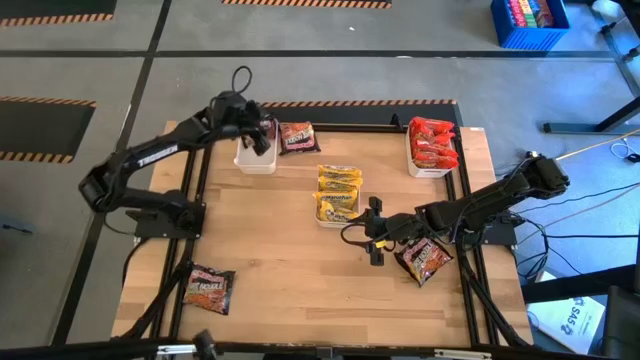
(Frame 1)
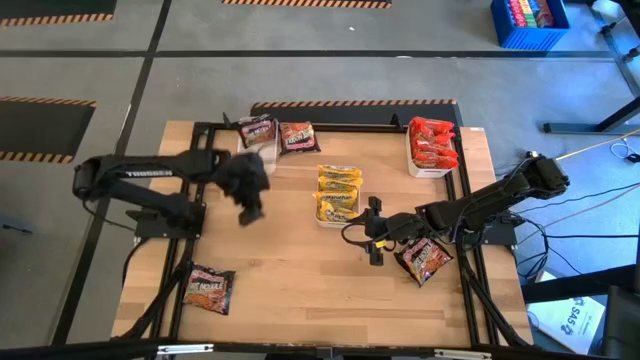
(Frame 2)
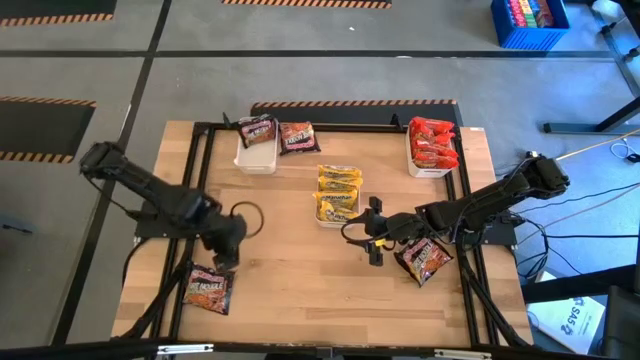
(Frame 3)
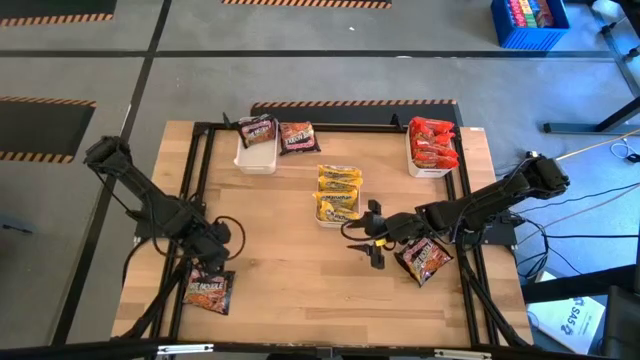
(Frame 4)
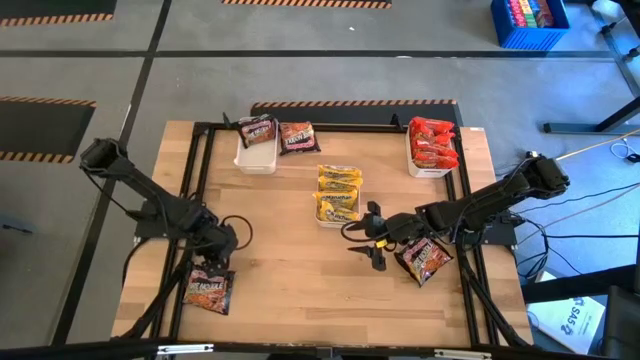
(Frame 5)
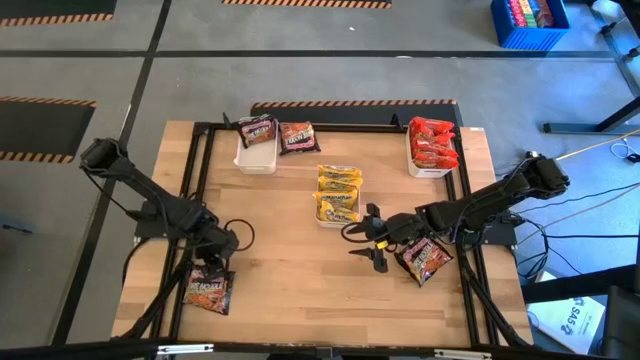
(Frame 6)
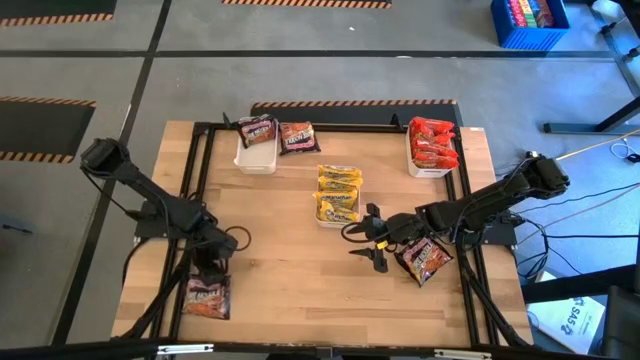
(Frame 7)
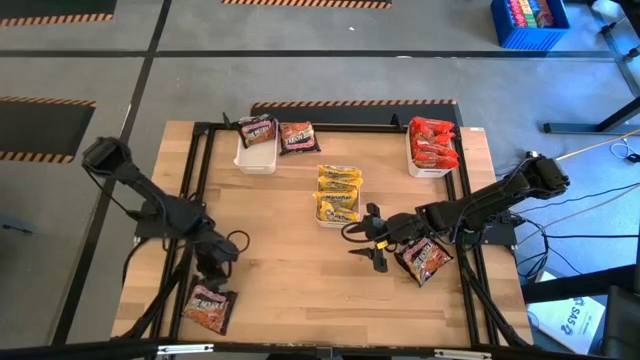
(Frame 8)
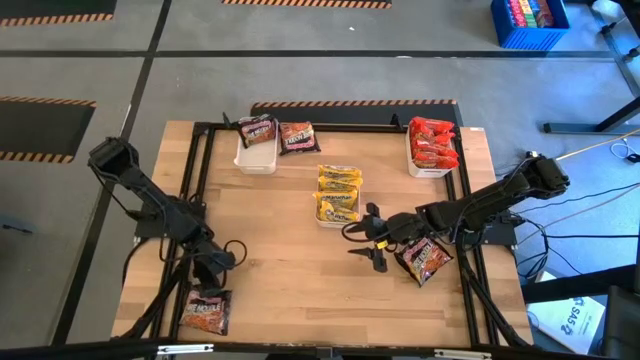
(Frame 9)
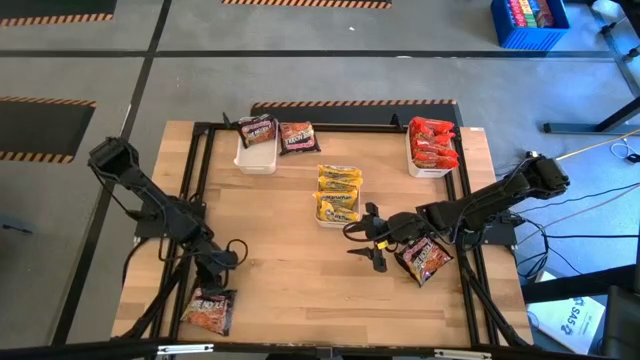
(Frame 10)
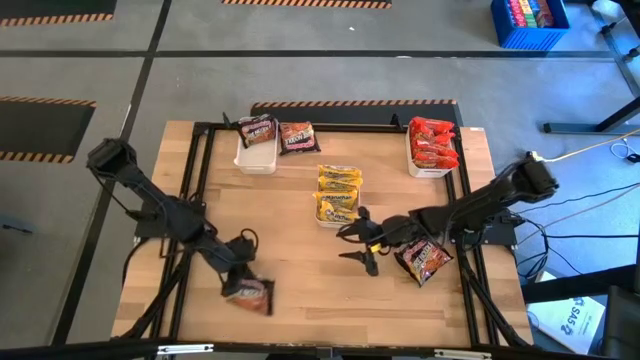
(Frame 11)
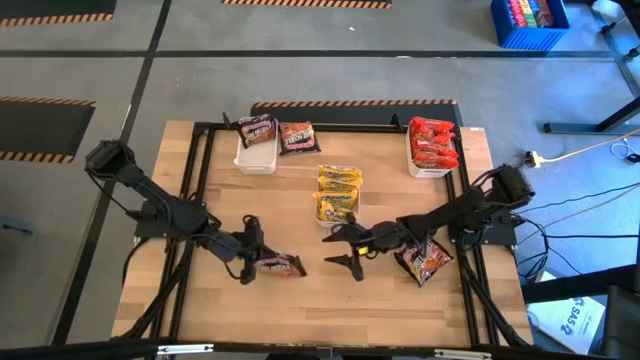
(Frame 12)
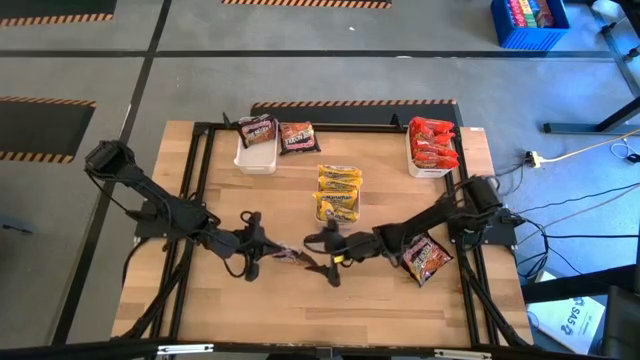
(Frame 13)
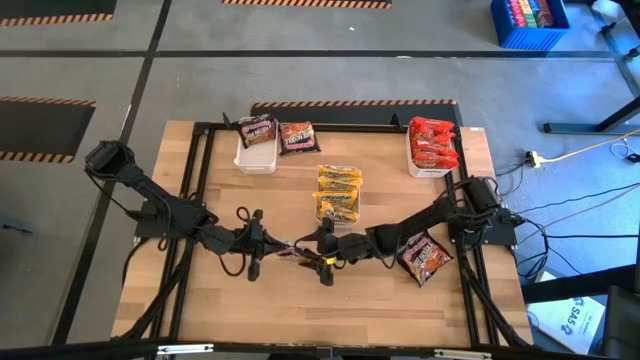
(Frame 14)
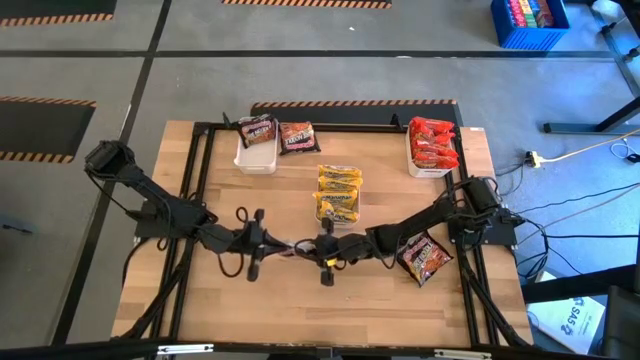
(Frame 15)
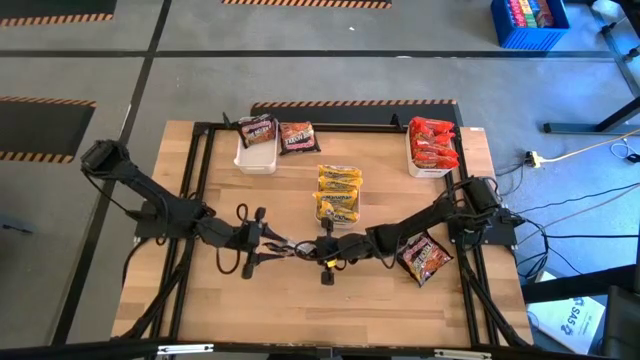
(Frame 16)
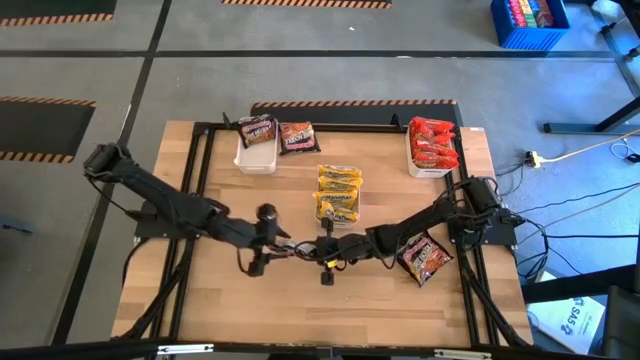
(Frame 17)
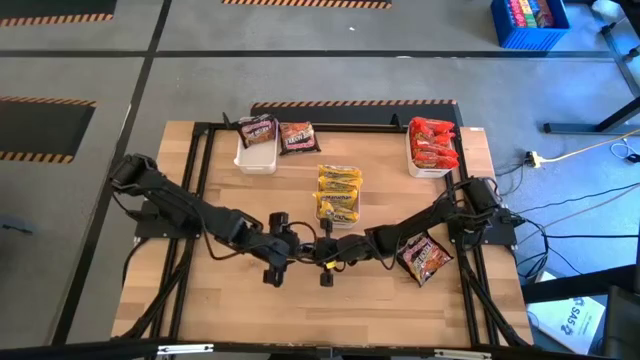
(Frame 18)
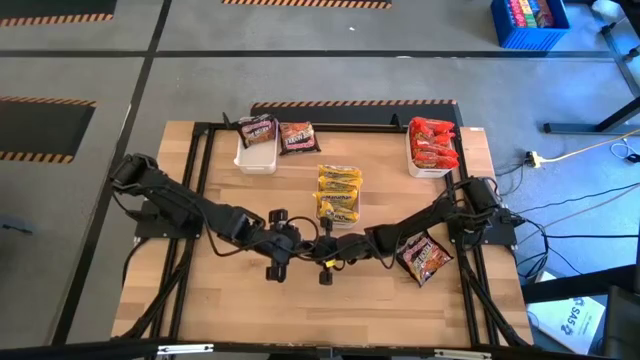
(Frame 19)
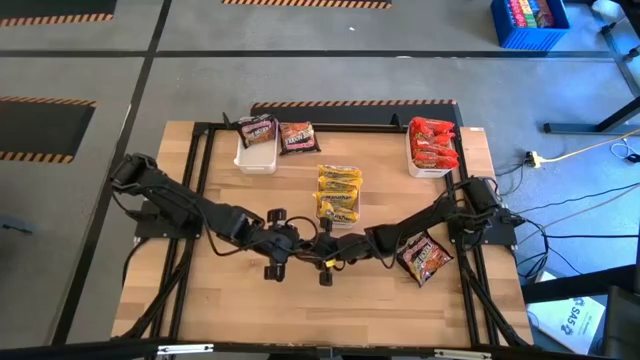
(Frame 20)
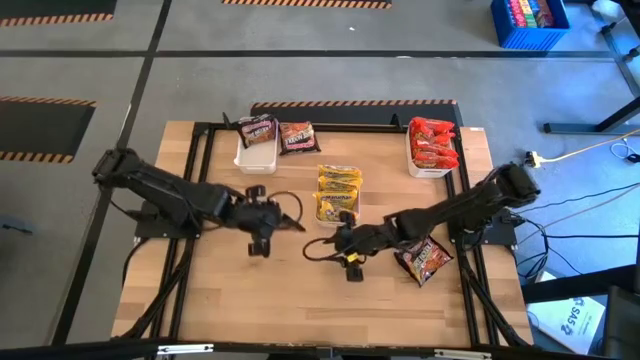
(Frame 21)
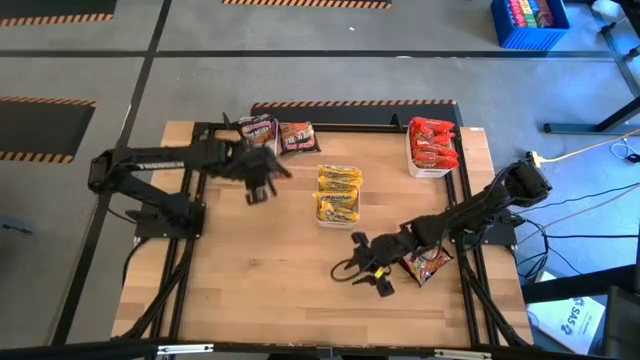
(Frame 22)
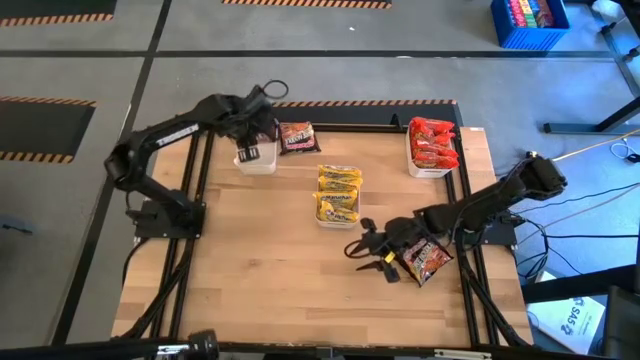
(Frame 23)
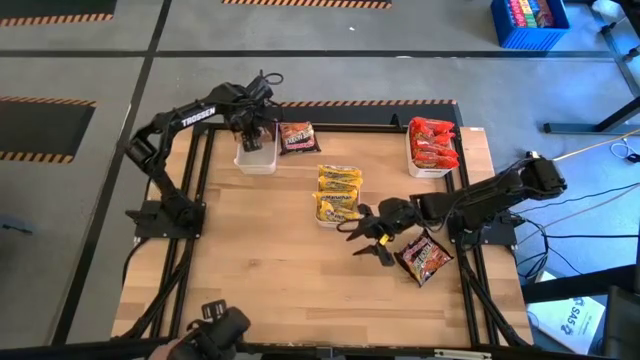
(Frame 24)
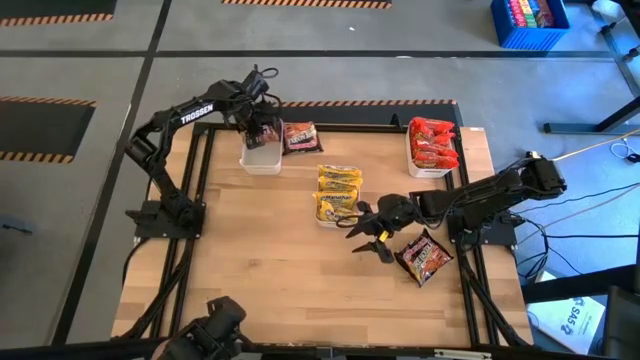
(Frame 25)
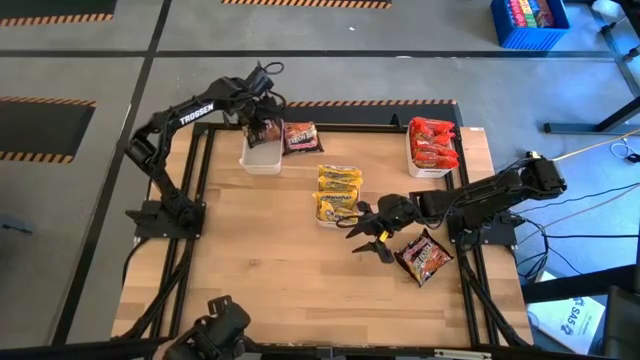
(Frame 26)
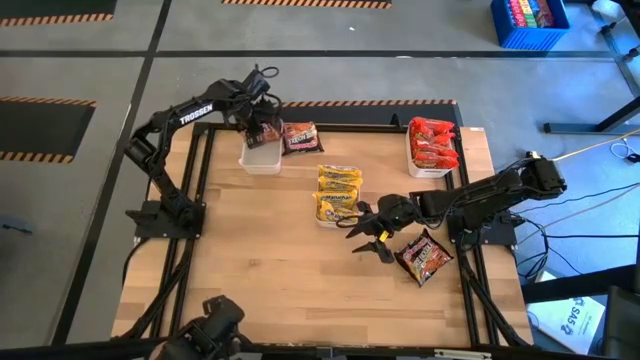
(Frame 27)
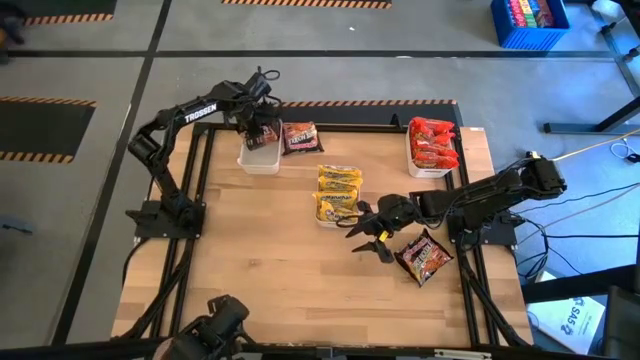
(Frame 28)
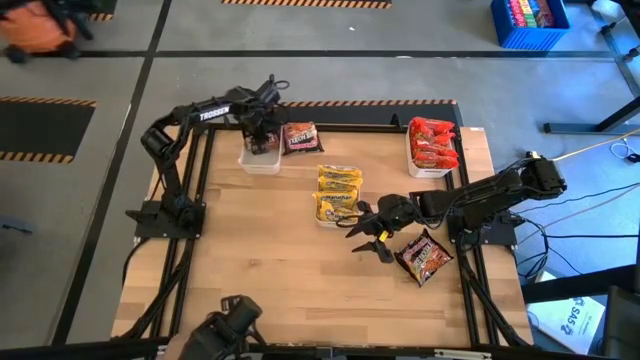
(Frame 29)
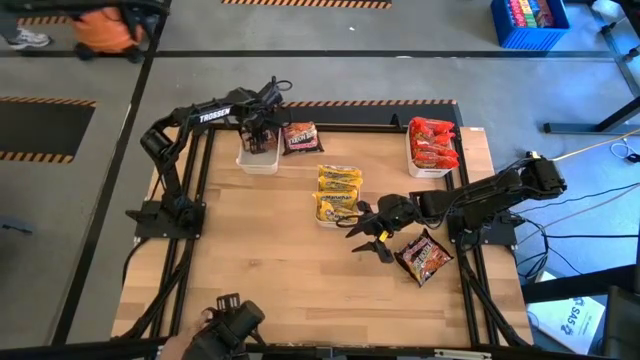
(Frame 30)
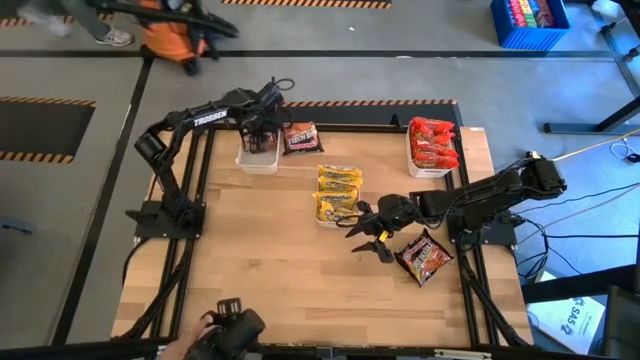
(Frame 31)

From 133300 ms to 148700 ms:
Task: Sort Maruchan noodles
Put the black noodle pack into the white left bin

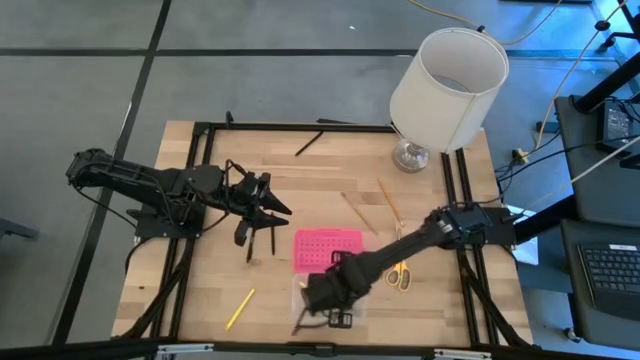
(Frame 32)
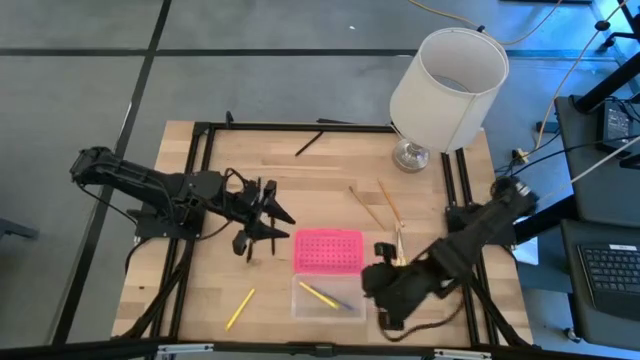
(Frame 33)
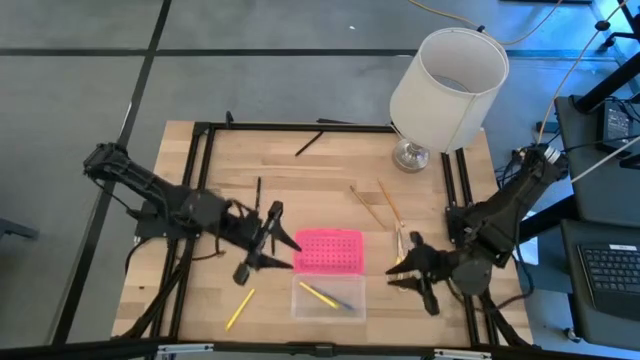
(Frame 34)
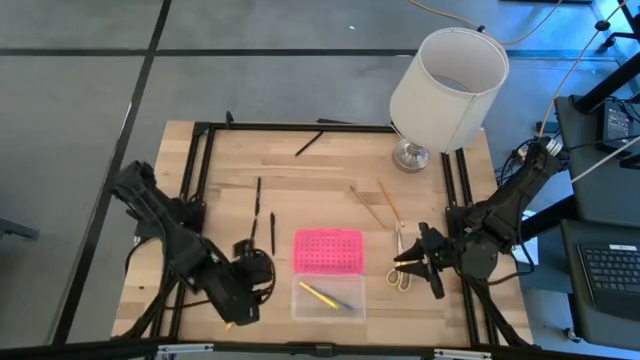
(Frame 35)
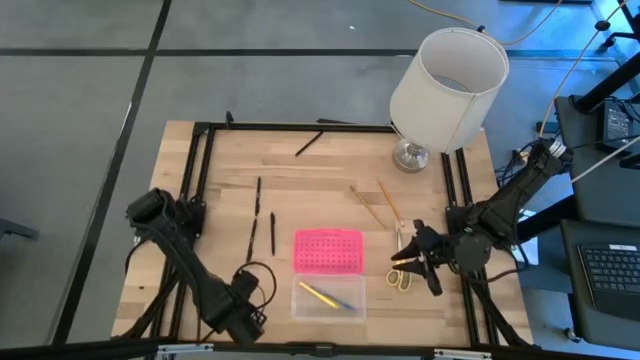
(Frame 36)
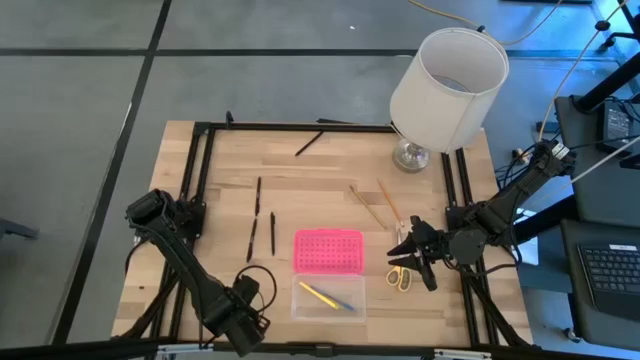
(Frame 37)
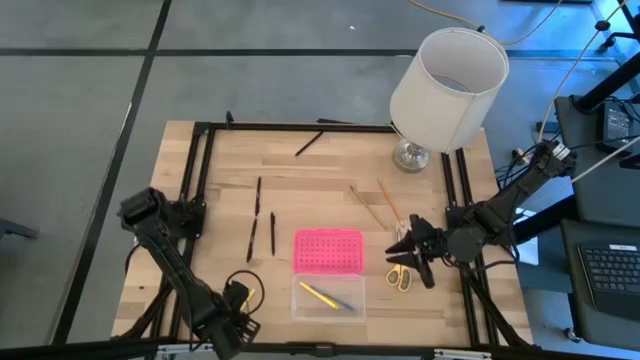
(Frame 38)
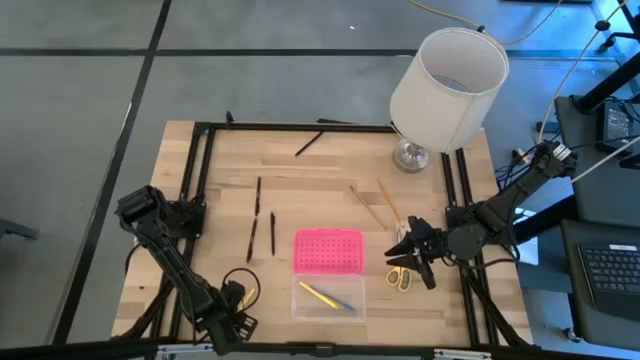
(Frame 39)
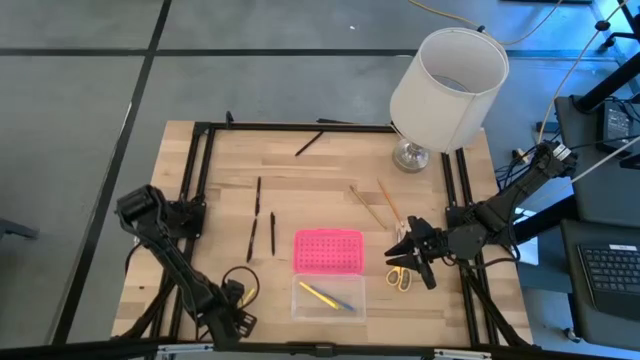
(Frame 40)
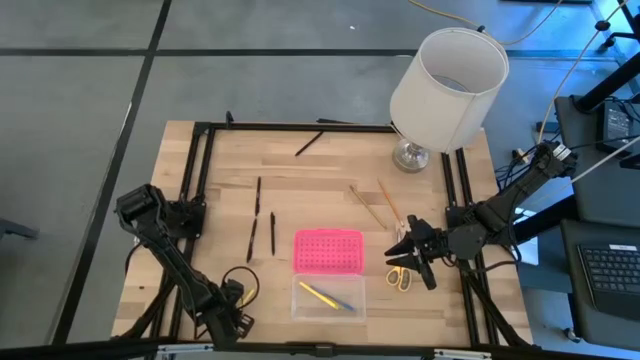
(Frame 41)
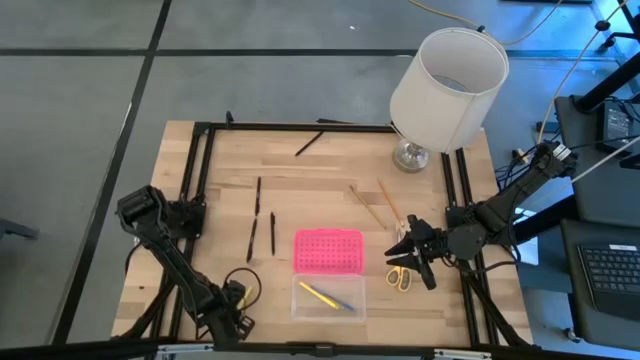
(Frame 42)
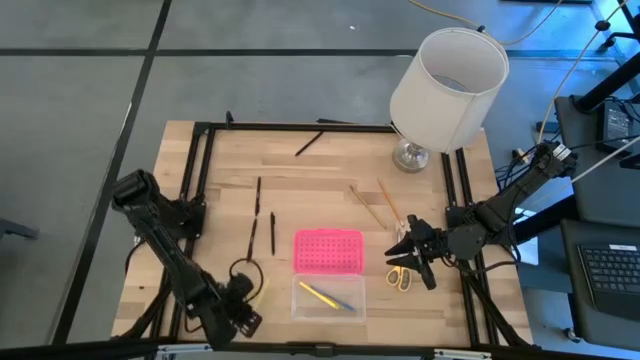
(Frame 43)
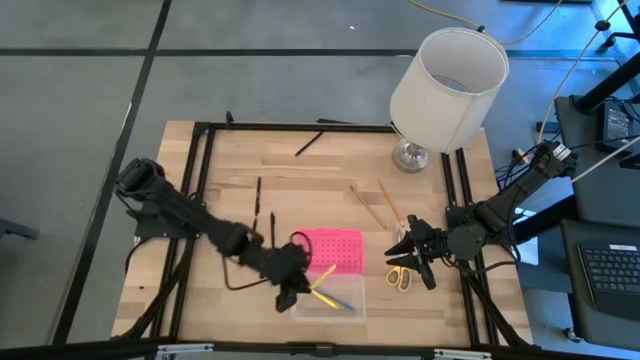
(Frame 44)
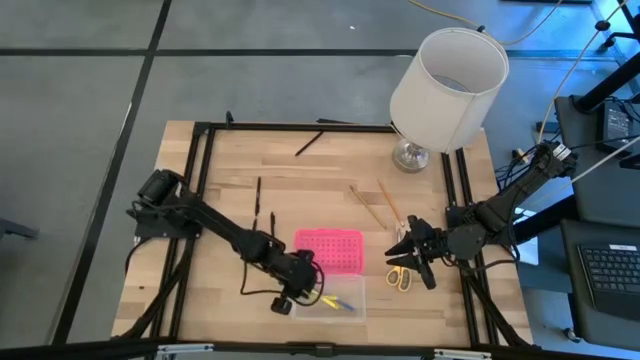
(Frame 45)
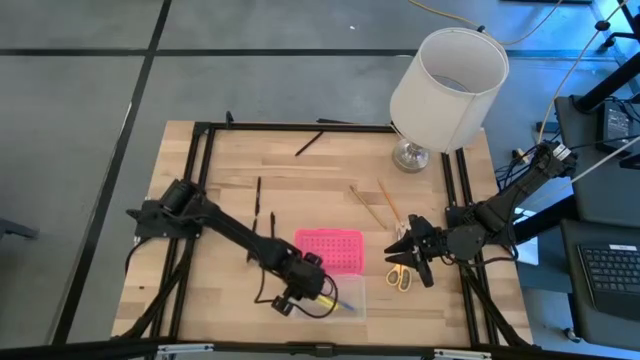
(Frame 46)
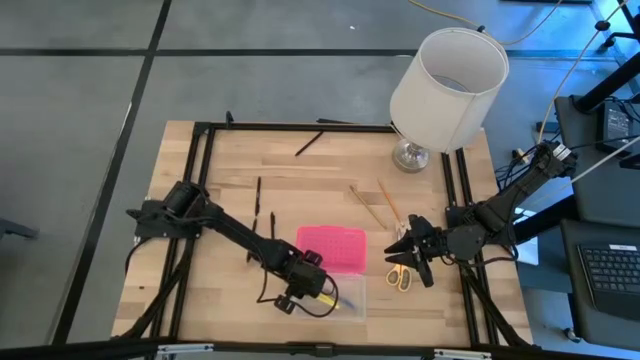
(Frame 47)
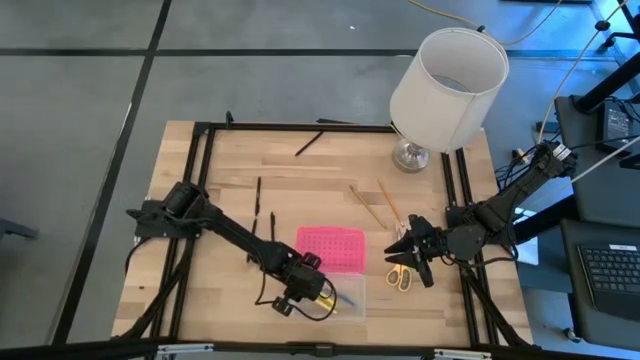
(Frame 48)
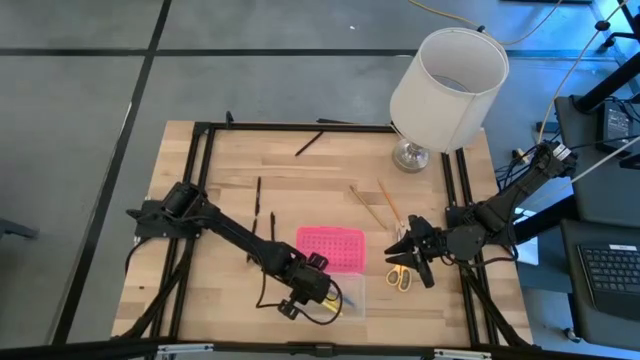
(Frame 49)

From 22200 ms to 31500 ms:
Task: Pick & place school supplies into a supply box
Put the yellow pen into the pink supply box
